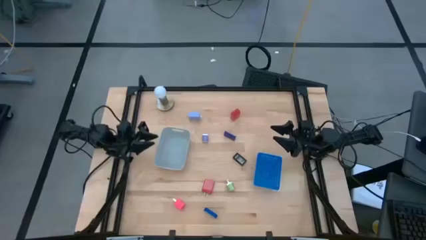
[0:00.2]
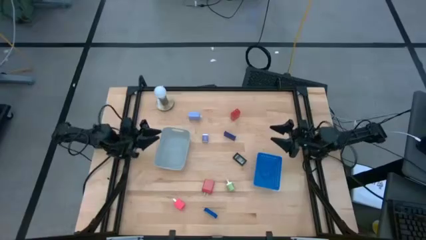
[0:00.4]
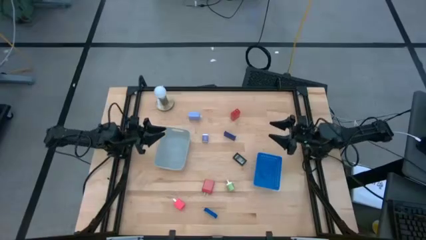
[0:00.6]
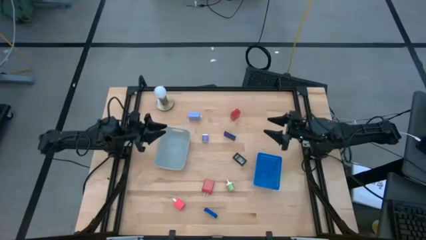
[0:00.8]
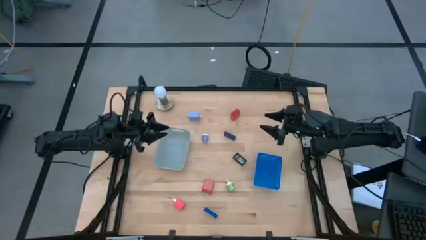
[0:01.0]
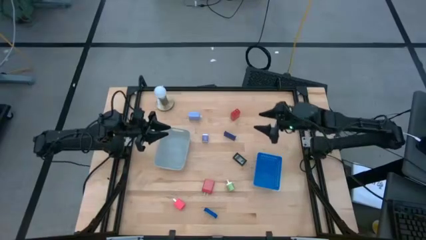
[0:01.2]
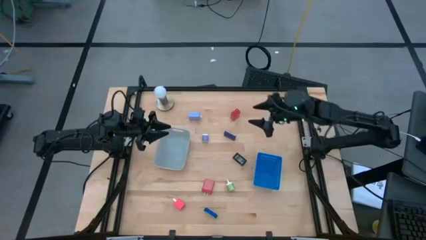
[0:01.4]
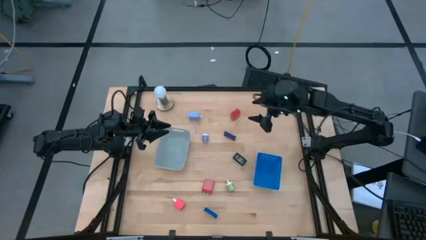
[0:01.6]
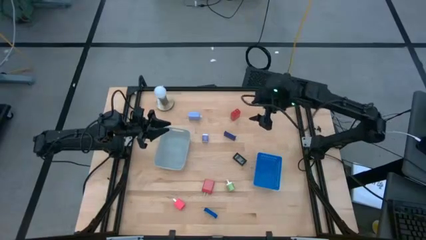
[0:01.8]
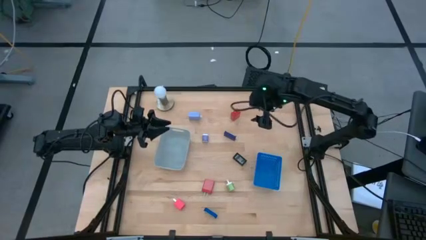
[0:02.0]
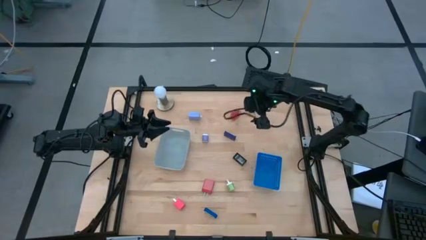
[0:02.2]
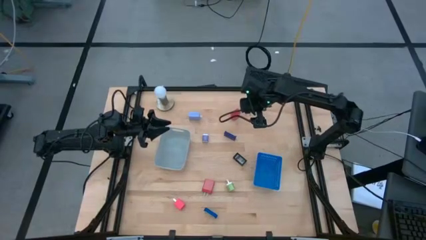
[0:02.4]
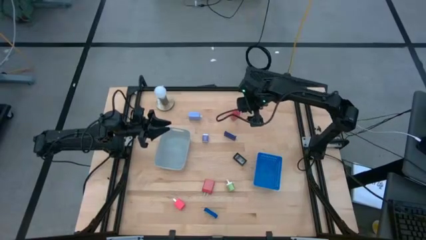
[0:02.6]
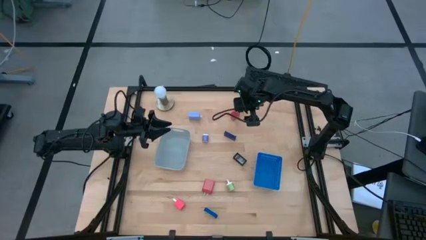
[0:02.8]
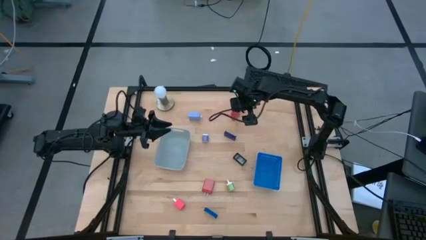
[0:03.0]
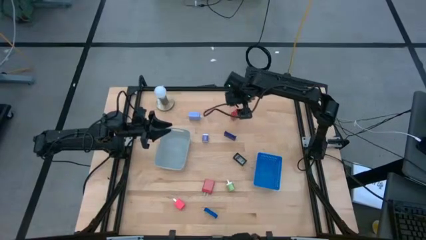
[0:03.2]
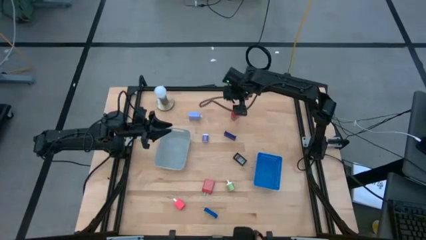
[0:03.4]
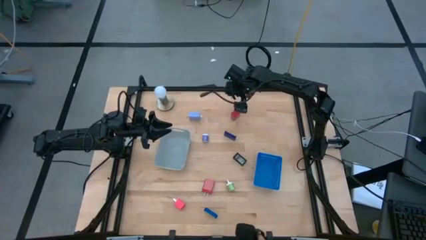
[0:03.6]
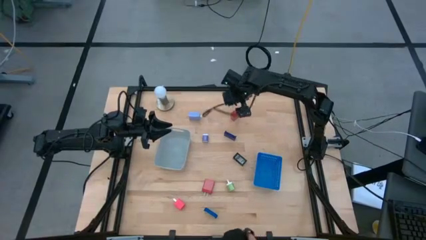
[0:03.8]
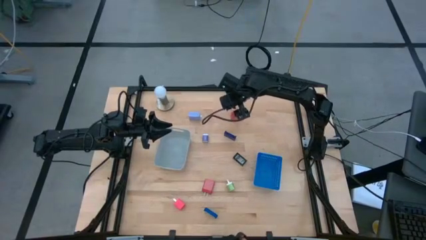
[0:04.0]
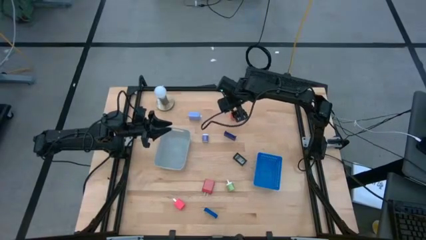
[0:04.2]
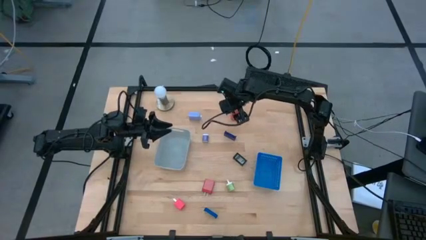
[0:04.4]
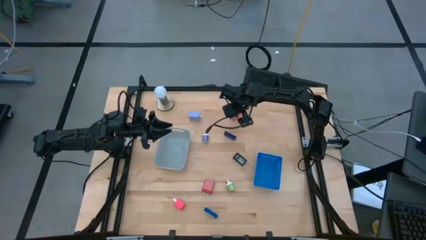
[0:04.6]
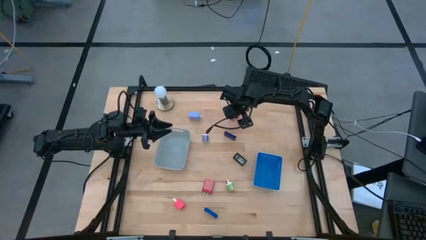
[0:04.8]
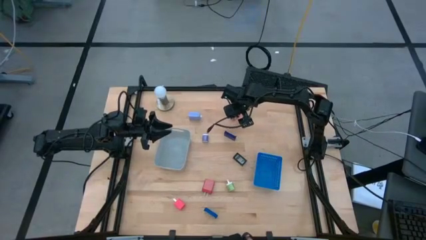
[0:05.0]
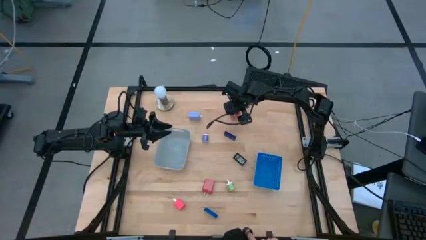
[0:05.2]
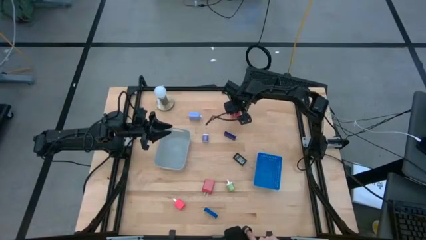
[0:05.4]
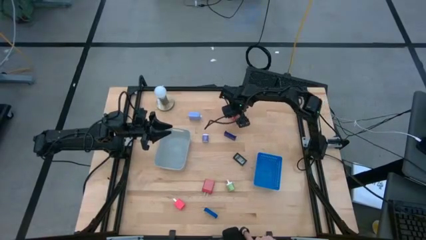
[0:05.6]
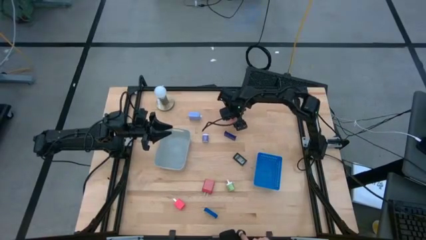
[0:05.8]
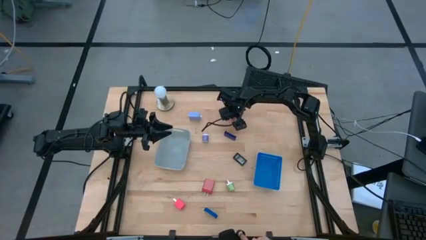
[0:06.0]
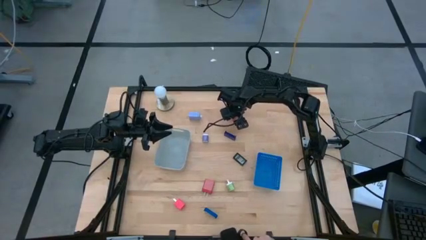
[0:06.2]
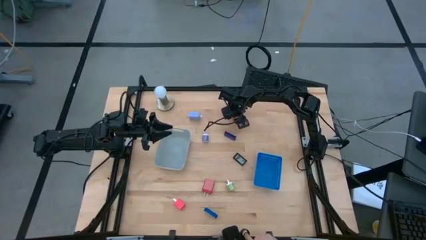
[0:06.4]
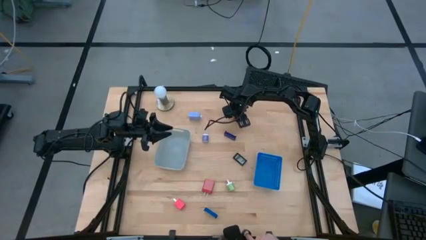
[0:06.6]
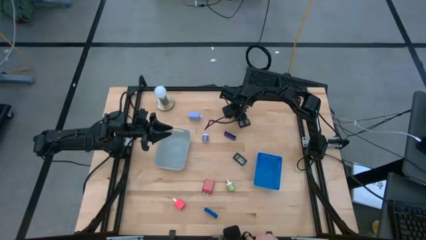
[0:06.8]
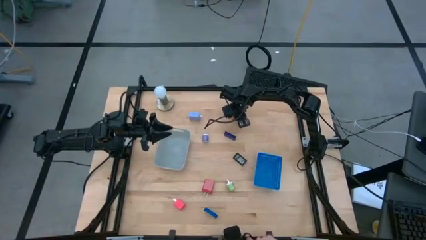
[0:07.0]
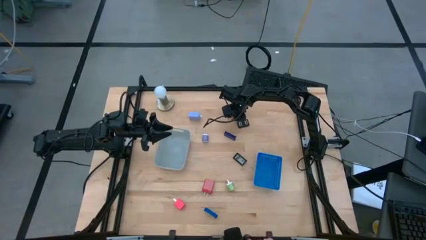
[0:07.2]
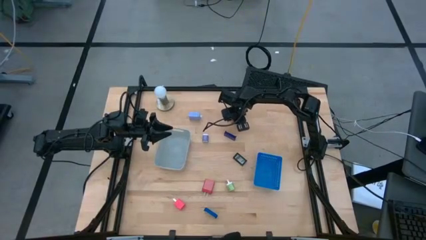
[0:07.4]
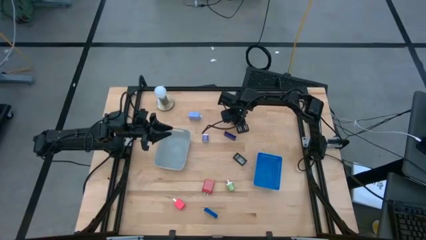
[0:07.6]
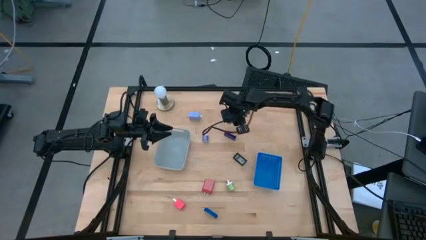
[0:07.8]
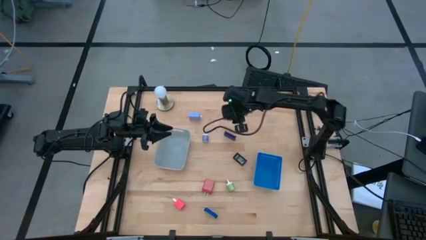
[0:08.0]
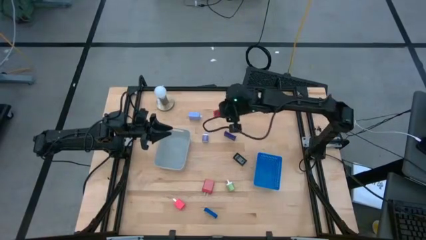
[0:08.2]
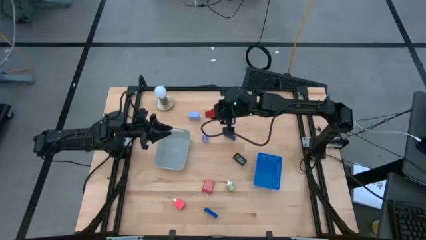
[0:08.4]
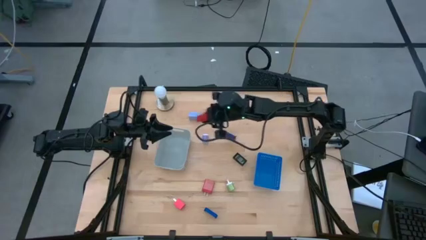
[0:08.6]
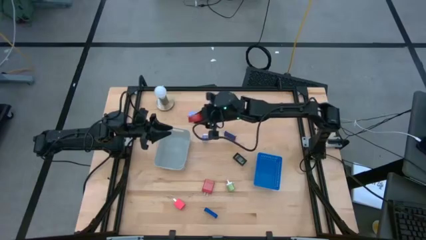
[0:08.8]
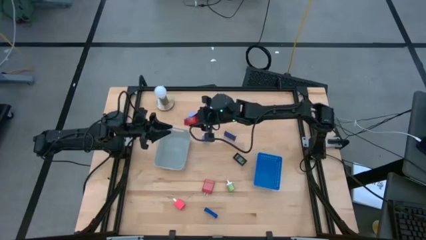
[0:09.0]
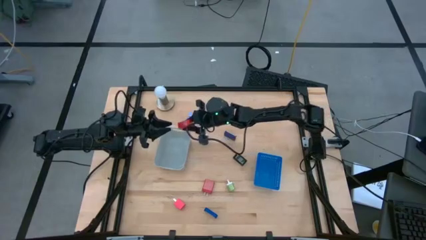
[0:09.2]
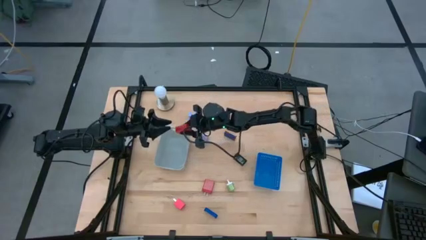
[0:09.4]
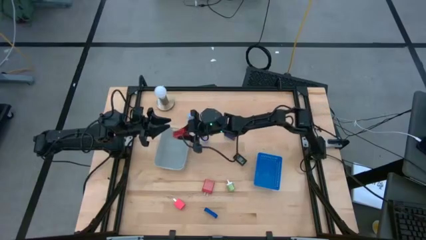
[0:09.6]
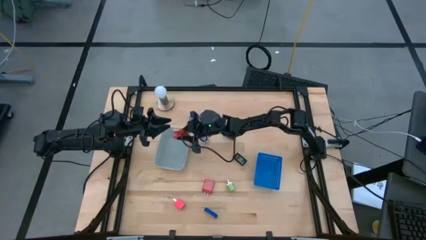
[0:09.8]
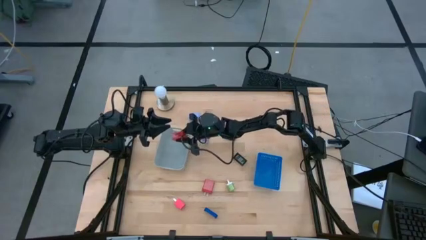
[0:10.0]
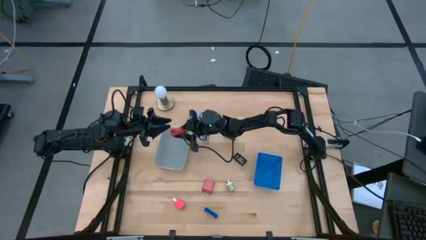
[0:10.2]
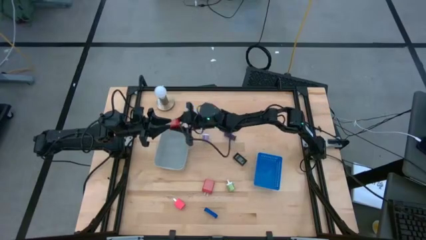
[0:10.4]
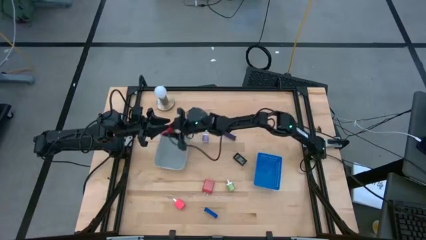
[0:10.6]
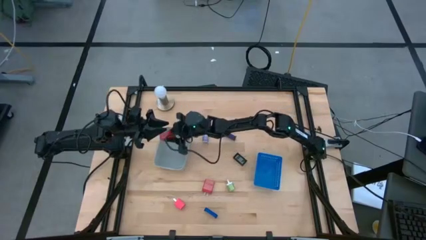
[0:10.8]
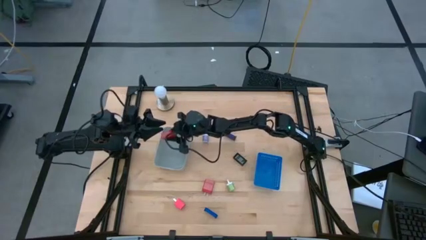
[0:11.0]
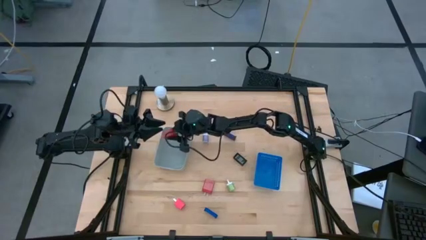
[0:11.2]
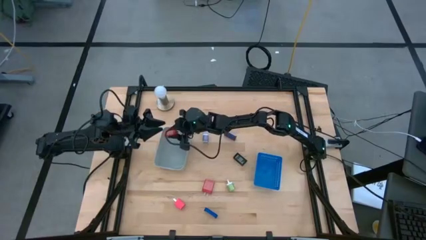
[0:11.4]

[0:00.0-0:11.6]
Task: Pick & Place Office items
Put the top red charger adapter into the gray bin

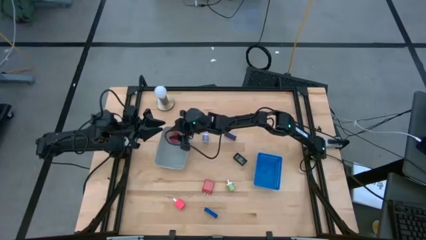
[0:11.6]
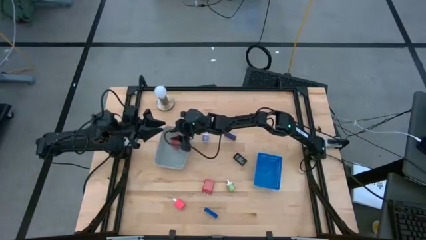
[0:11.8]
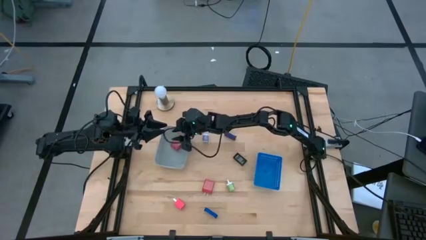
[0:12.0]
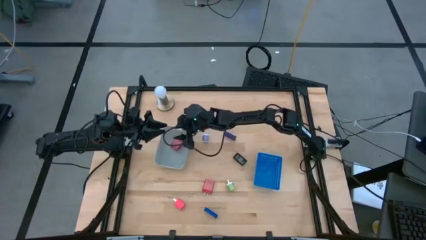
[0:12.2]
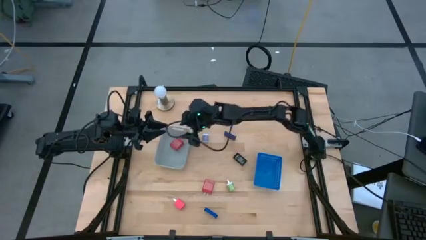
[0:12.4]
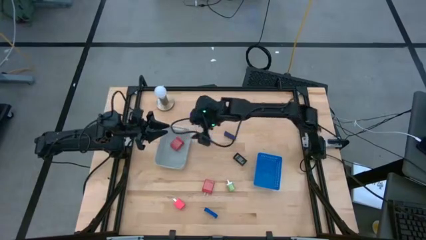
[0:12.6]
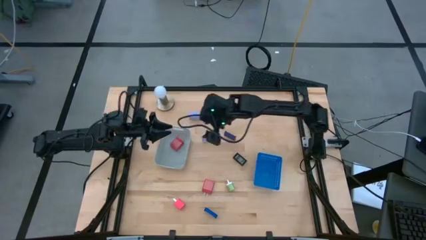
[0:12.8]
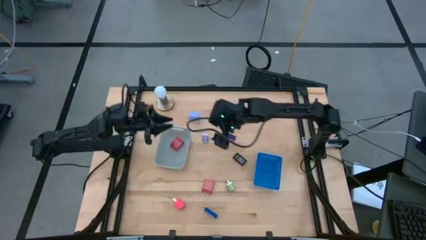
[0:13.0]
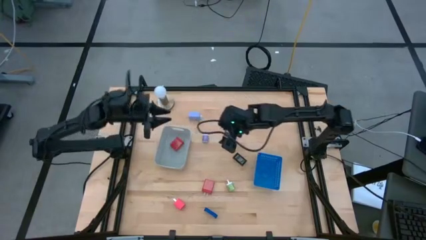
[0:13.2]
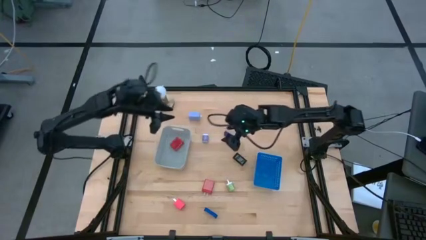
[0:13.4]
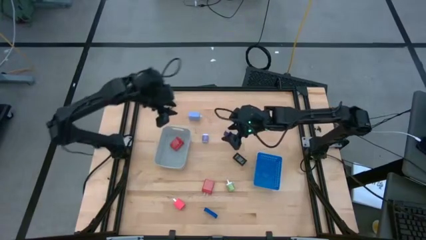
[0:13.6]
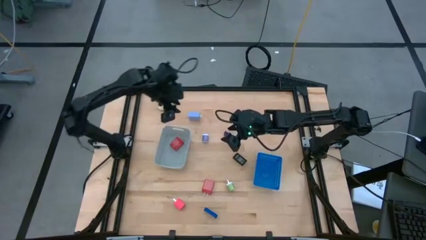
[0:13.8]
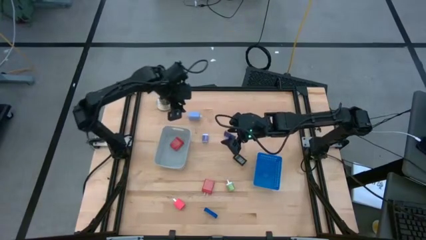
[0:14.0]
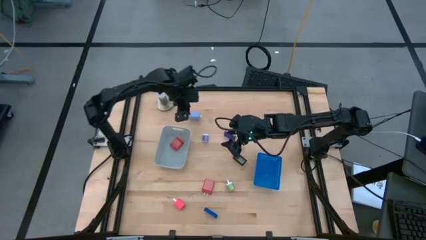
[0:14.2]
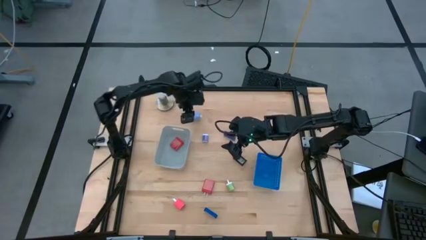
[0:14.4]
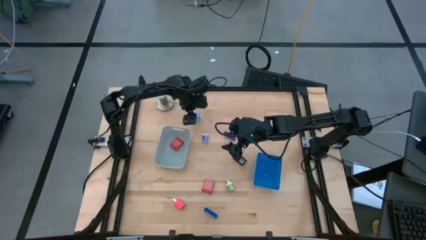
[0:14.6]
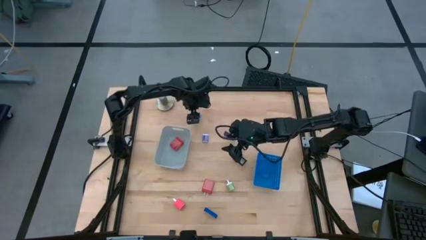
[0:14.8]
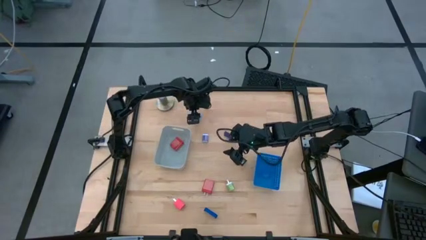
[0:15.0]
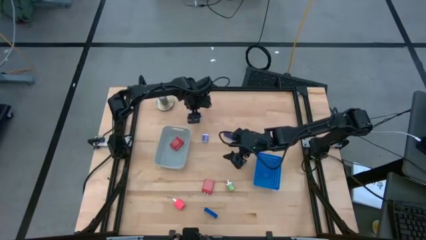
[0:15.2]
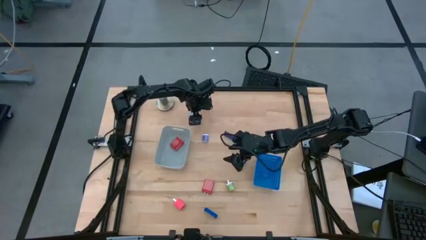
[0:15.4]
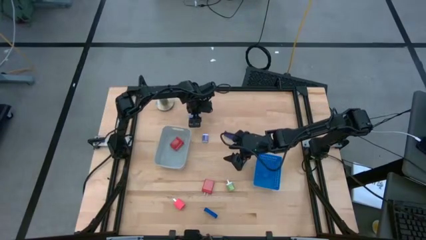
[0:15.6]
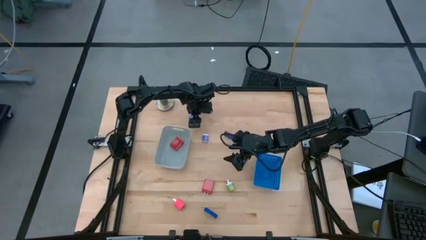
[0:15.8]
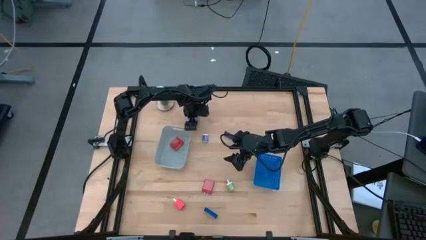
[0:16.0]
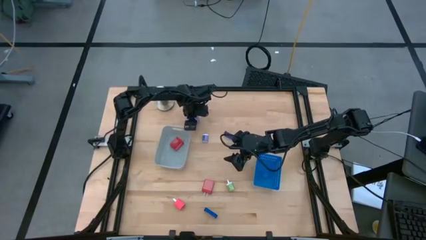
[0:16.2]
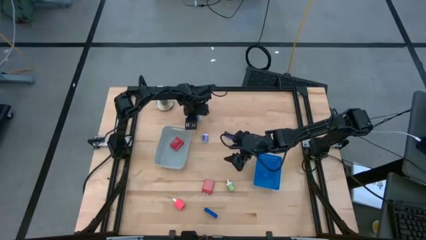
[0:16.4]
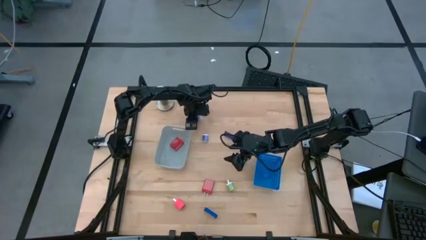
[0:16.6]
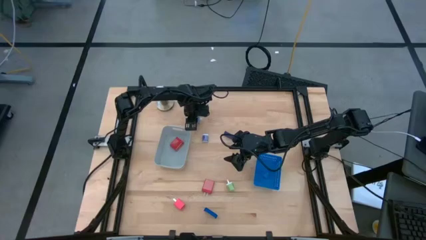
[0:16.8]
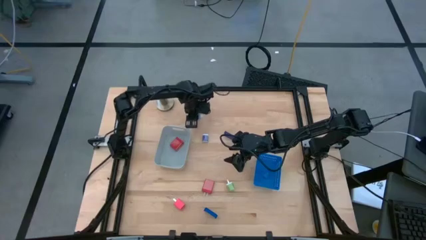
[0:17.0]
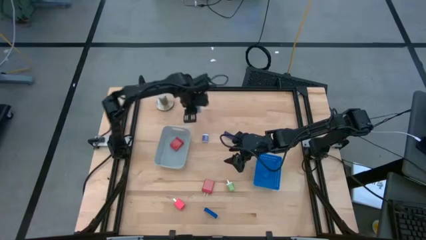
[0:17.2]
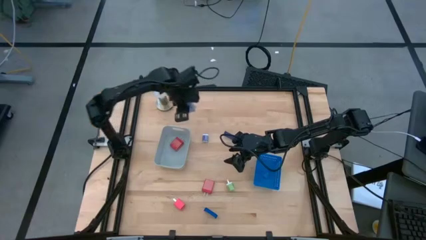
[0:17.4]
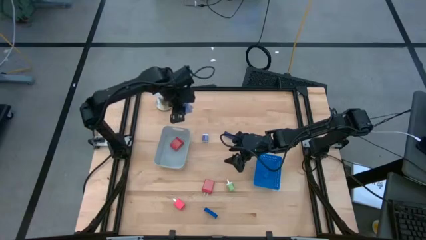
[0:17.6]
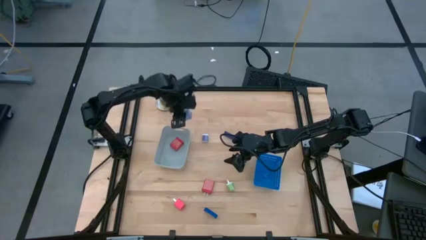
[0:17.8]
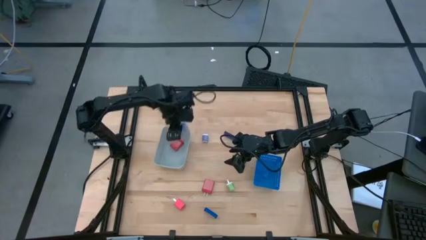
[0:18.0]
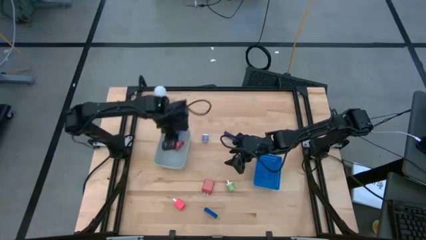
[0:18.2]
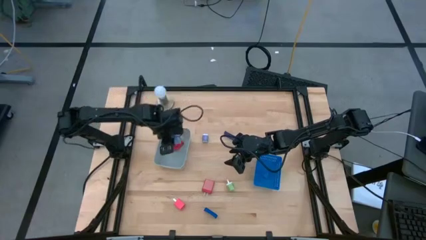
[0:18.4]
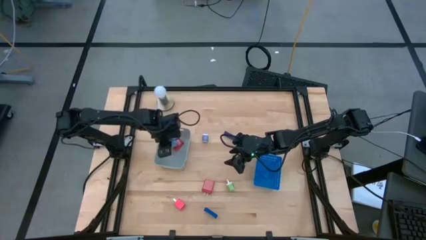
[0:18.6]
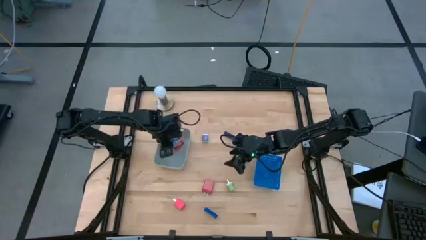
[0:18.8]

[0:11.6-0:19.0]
Put the blue charger adapter into the gray bin
